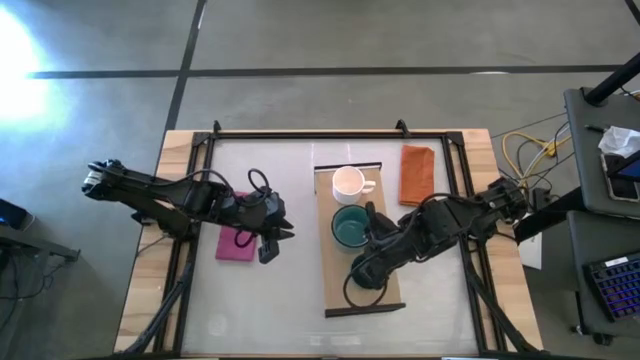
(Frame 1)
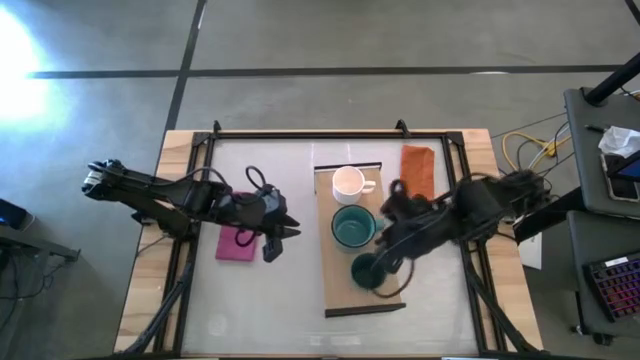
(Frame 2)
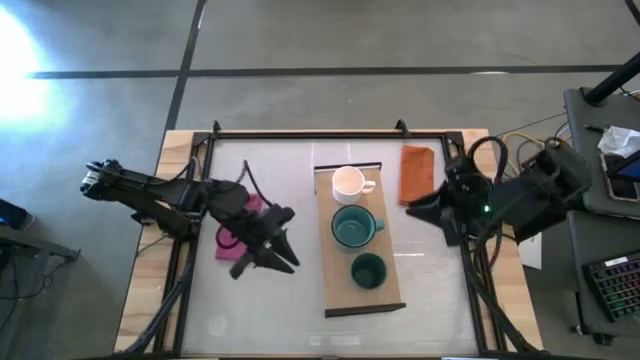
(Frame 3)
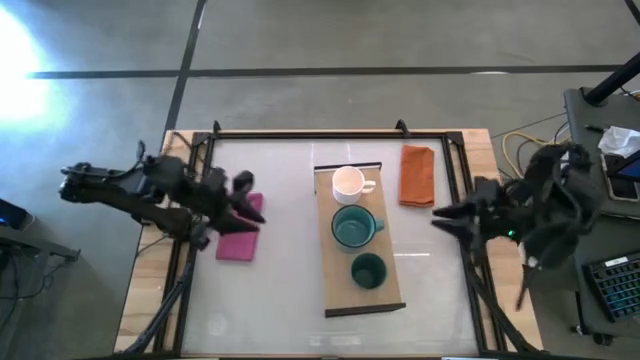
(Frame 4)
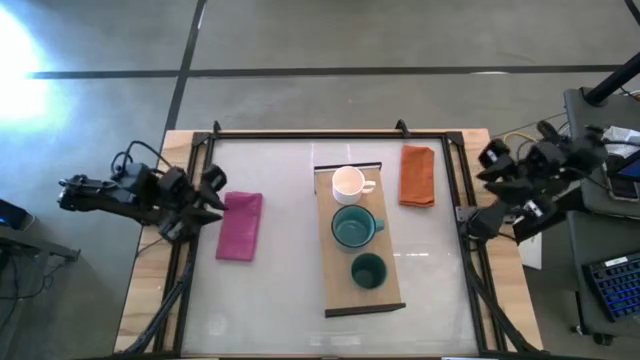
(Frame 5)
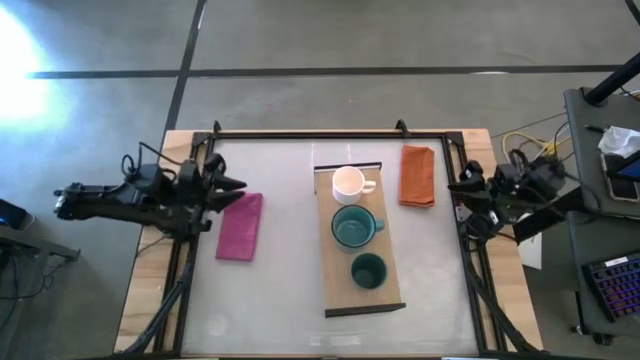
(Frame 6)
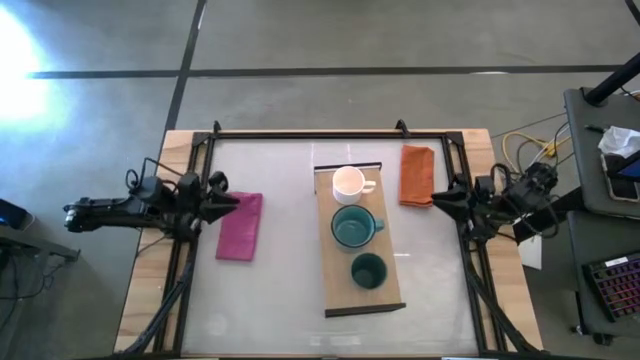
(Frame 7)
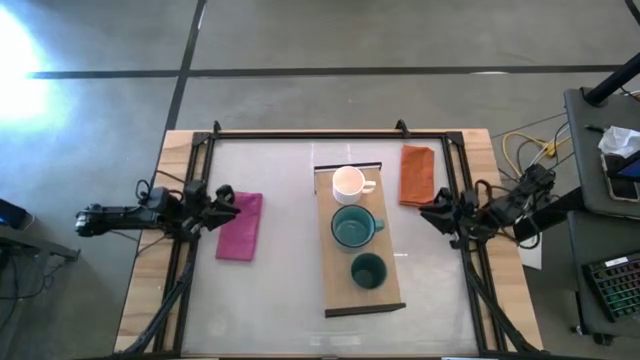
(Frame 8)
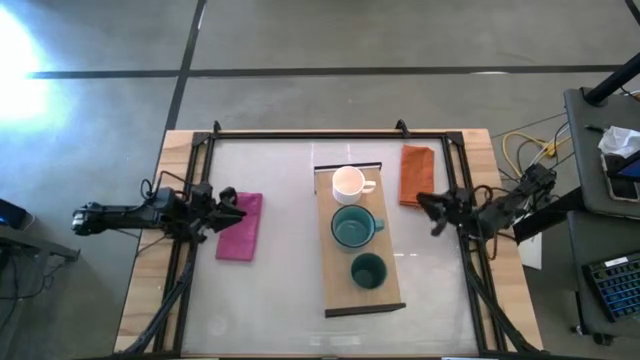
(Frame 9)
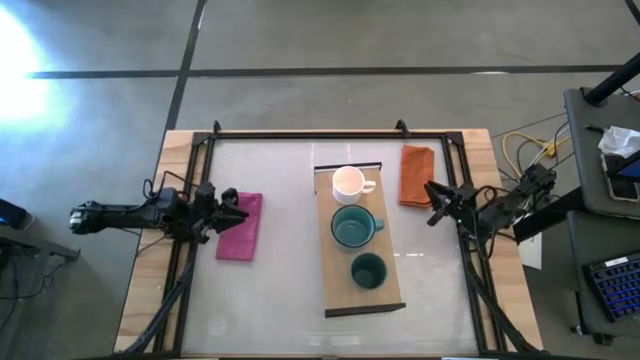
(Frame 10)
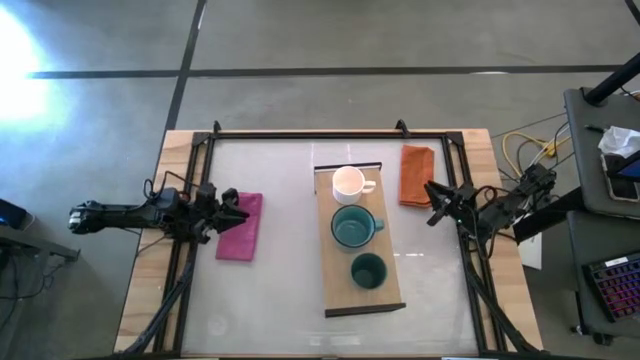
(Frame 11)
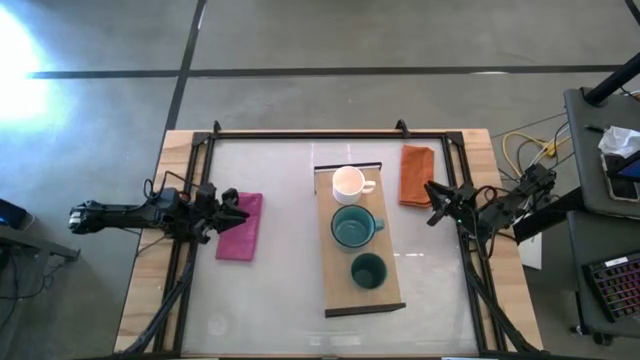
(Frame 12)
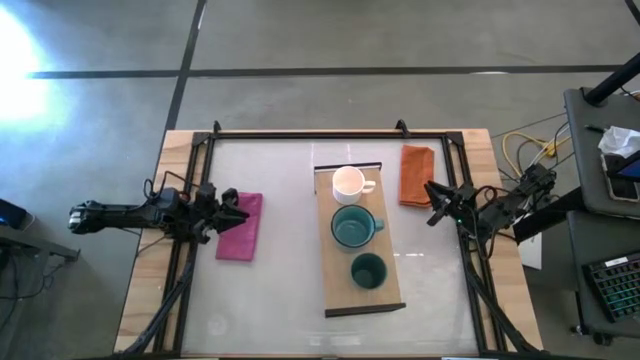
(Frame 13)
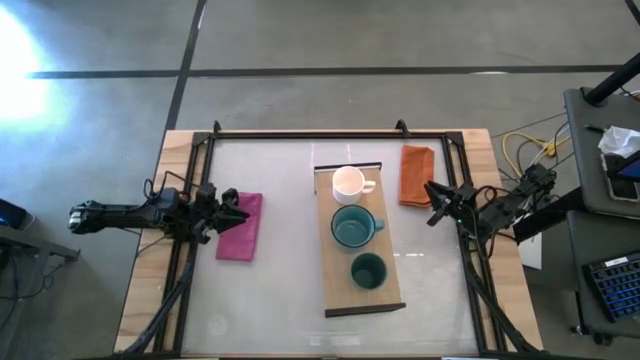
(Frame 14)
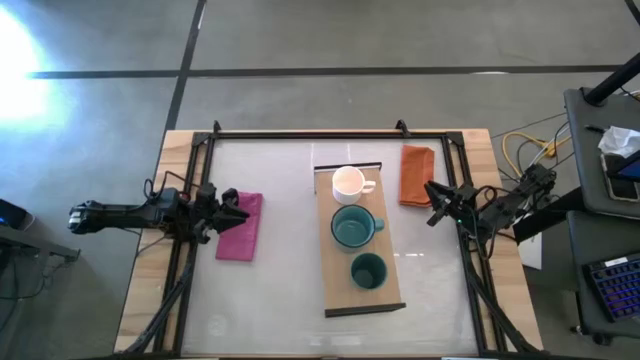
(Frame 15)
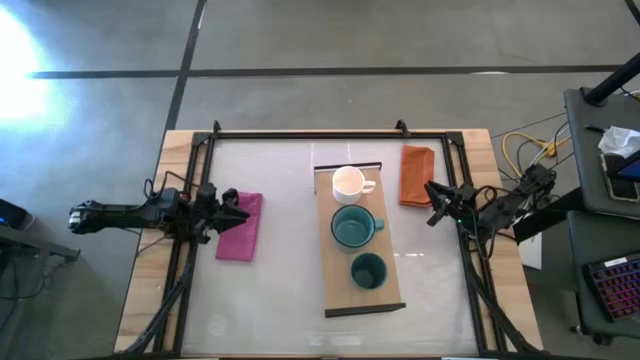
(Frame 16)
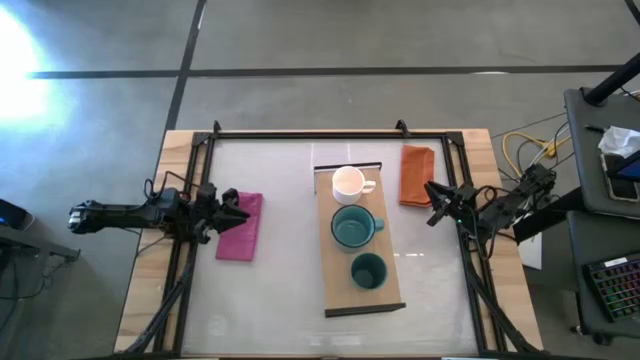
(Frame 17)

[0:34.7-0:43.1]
Task: Stack small to large cups/mugs on shelf
Return to Home Position

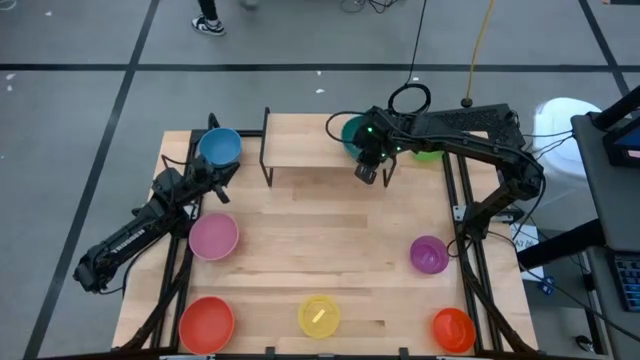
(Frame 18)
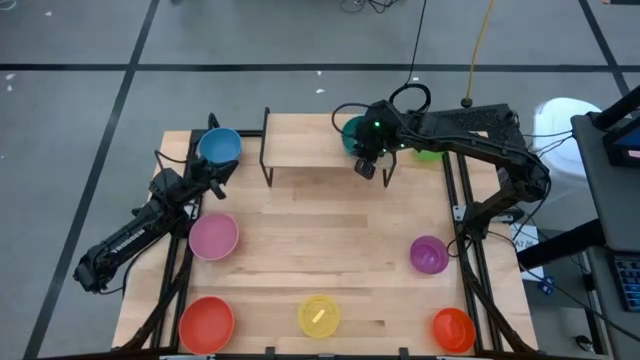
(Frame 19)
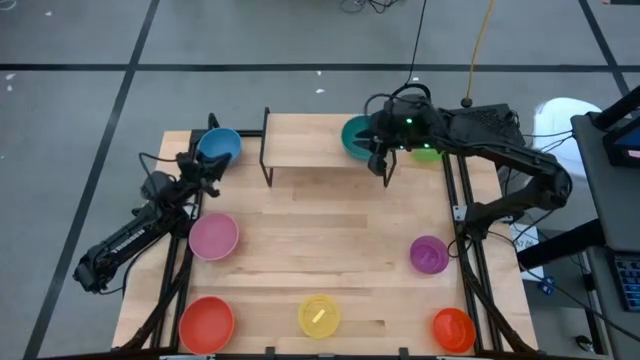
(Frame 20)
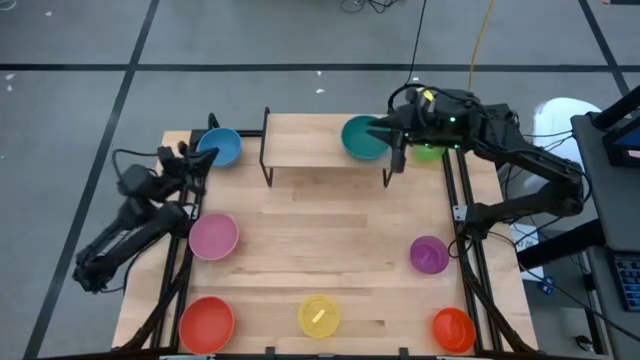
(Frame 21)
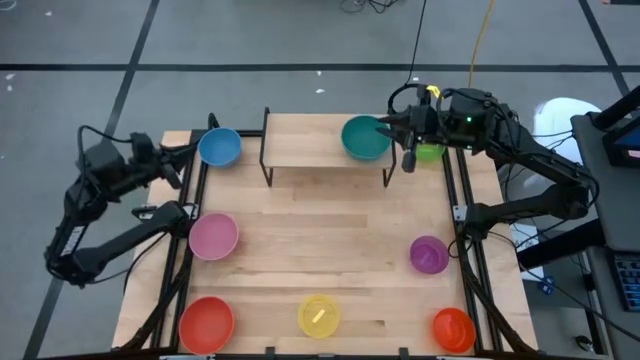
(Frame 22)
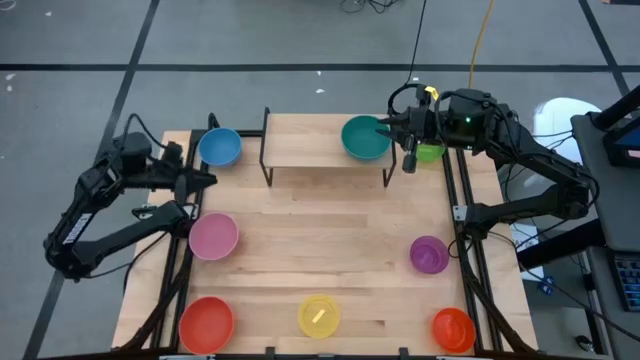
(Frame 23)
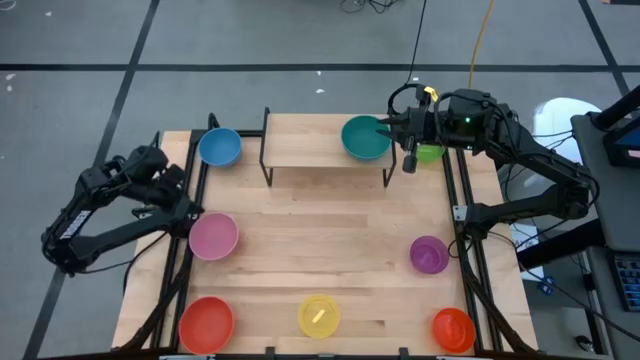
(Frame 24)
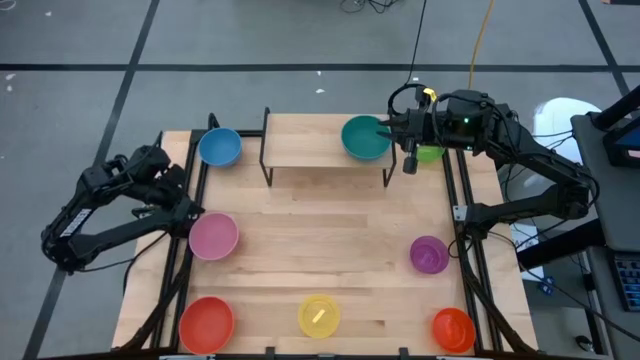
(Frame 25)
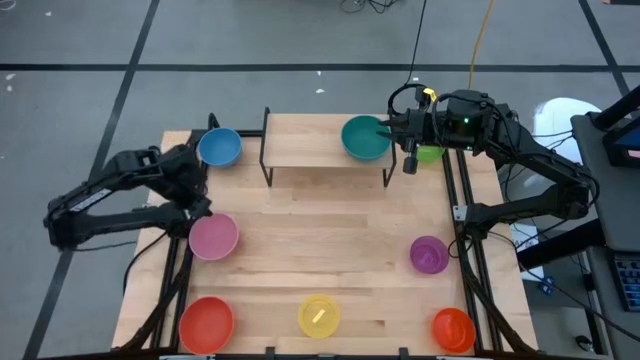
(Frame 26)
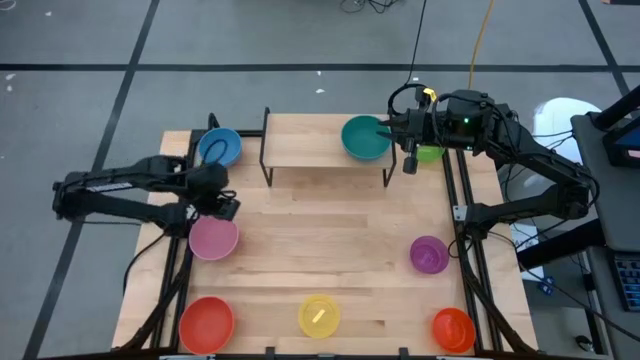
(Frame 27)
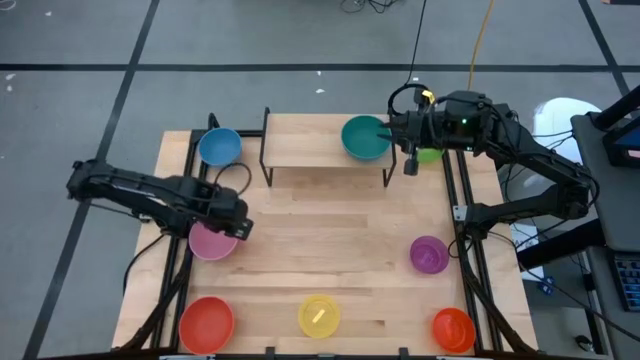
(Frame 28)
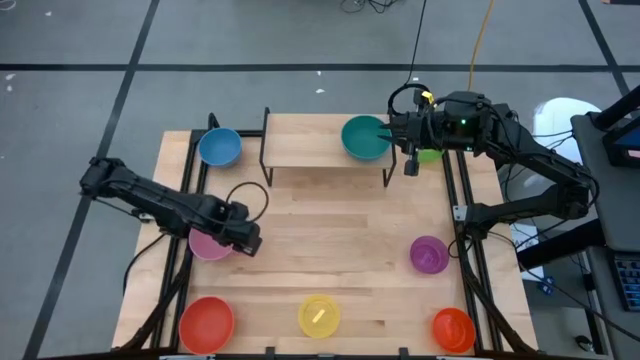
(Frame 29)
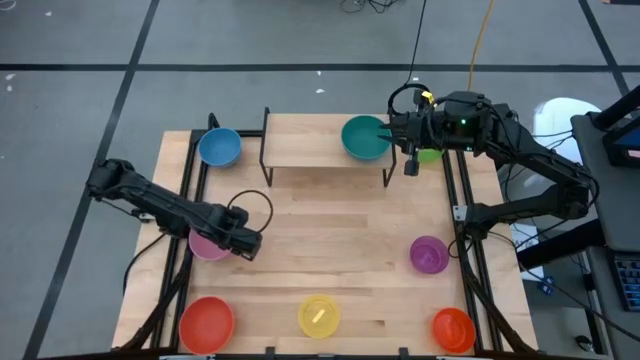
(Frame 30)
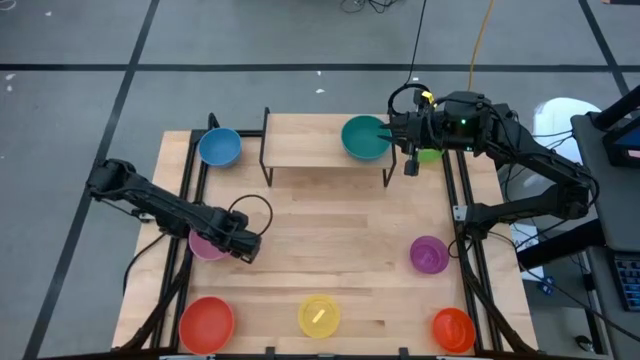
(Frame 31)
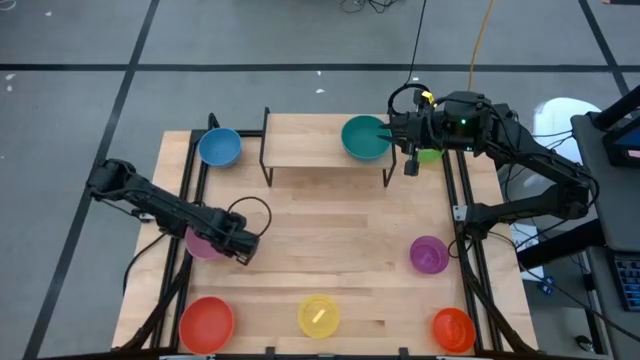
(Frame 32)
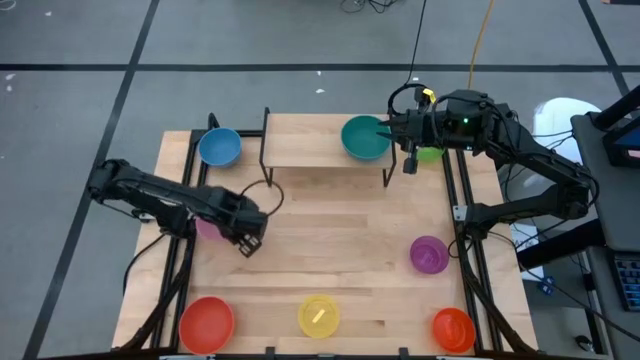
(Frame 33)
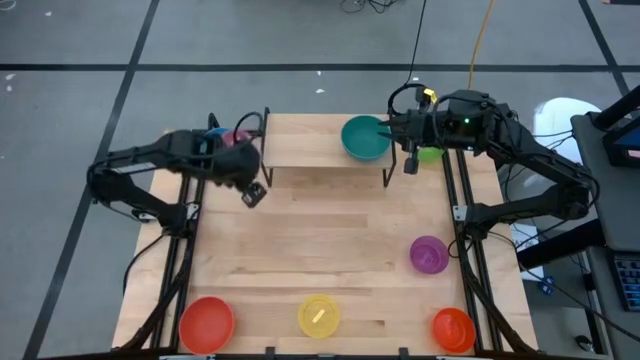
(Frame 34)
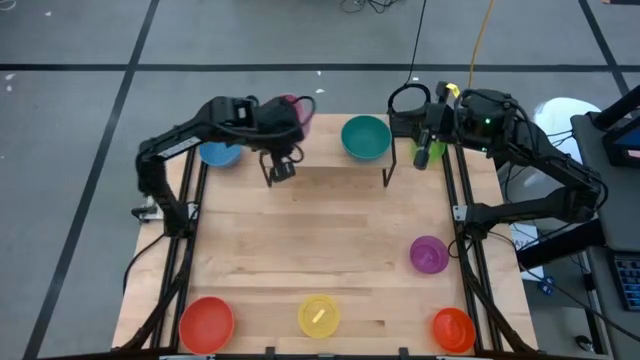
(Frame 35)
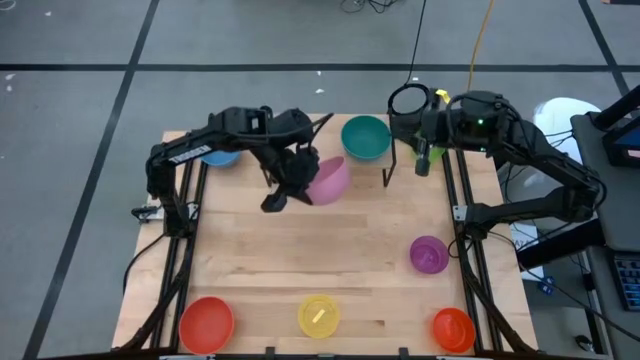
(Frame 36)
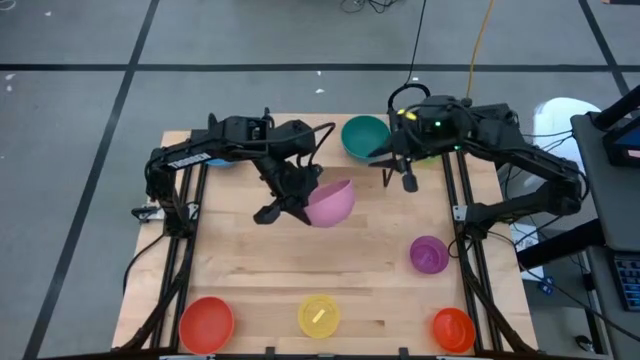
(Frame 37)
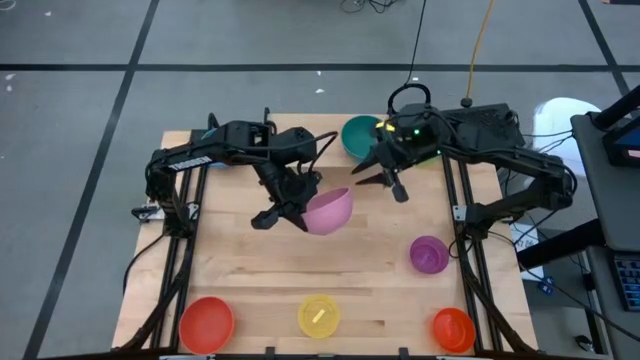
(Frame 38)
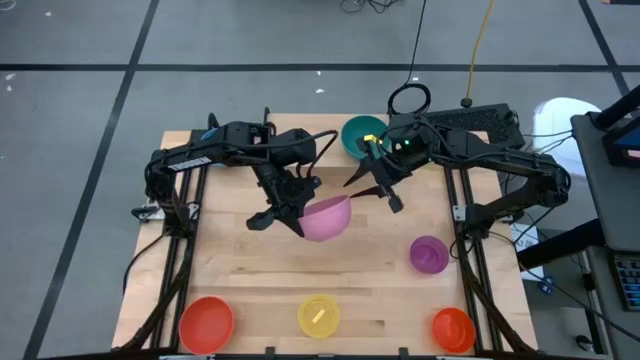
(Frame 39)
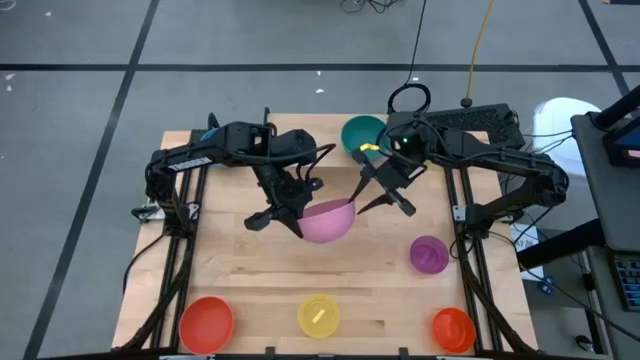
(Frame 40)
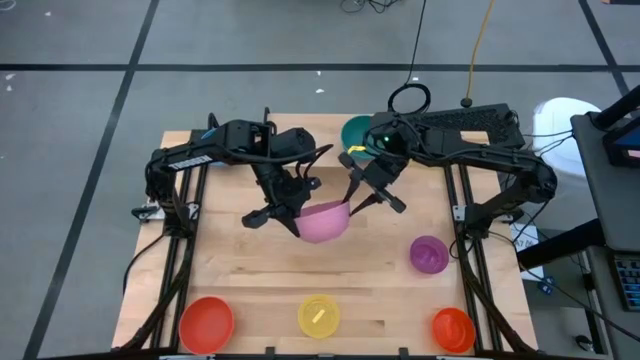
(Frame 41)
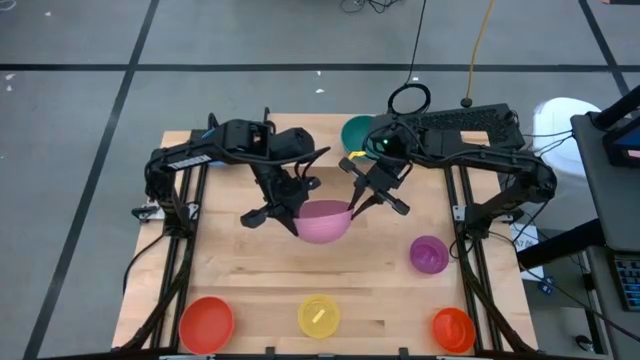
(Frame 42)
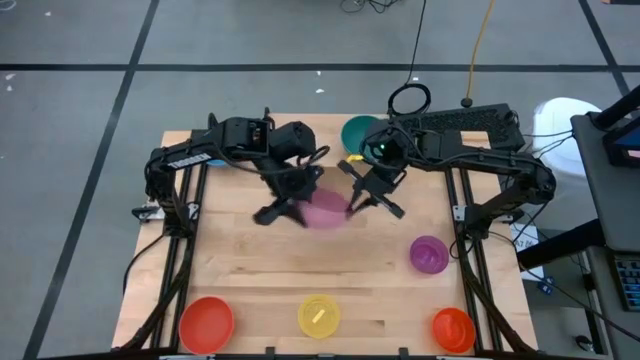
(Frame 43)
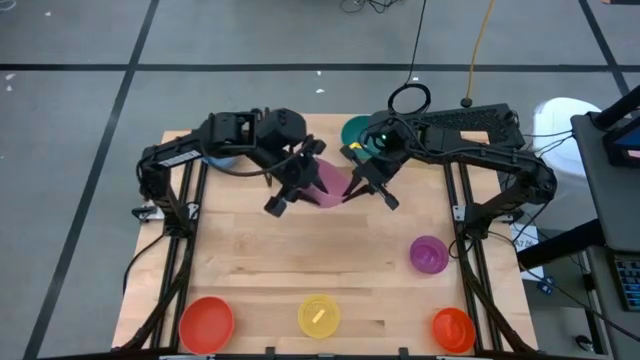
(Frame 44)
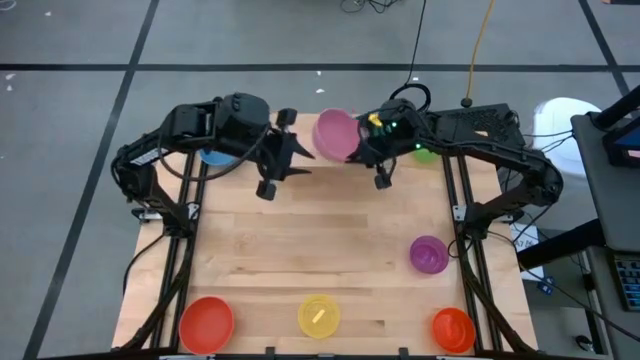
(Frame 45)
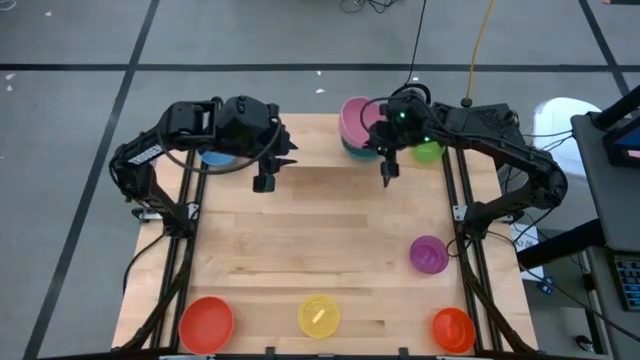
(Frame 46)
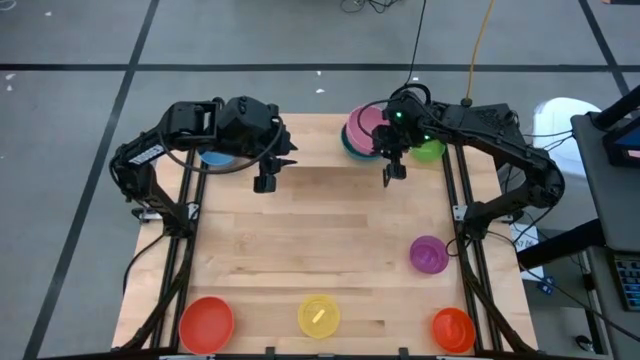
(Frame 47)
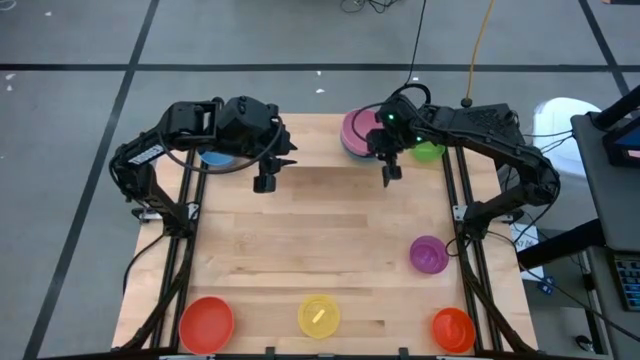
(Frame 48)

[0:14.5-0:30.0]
Task: Place and stack bowls onto a shelf
Stack the pink bowl on top of the dark green bowl on the shelf
